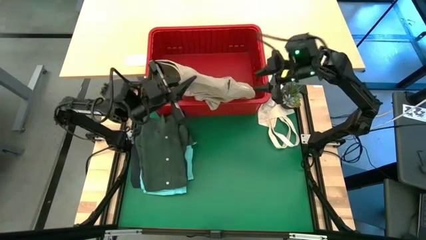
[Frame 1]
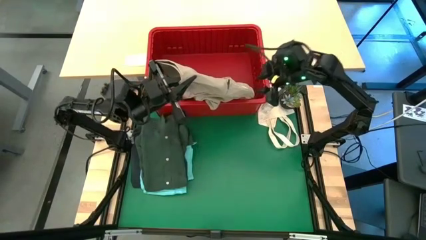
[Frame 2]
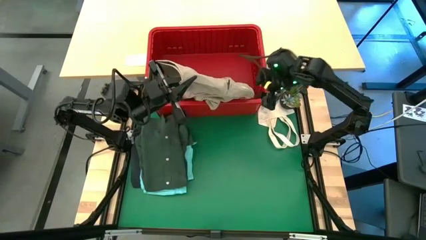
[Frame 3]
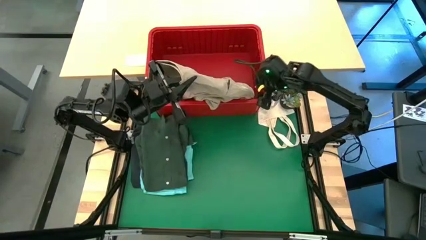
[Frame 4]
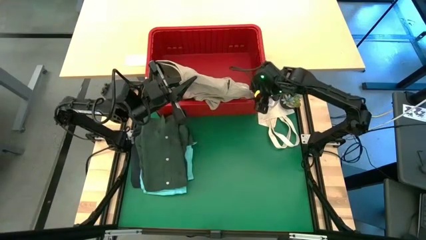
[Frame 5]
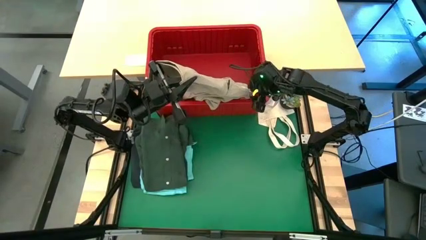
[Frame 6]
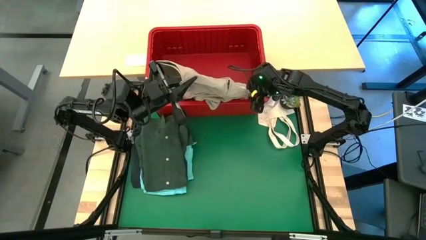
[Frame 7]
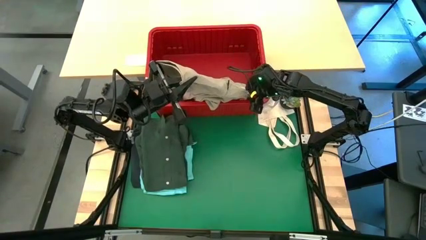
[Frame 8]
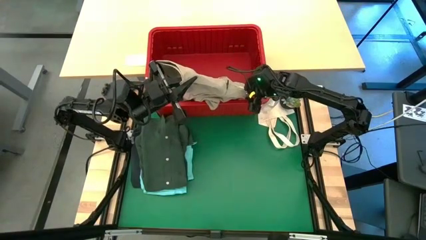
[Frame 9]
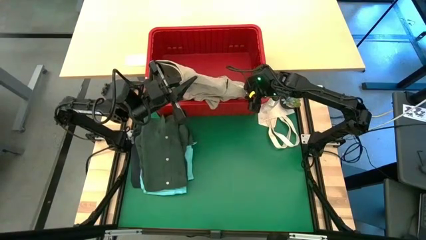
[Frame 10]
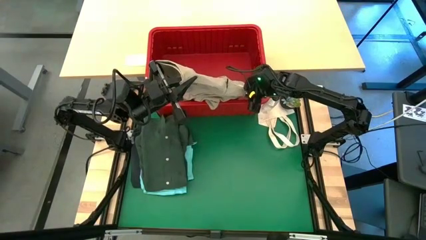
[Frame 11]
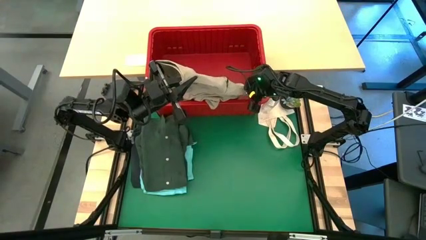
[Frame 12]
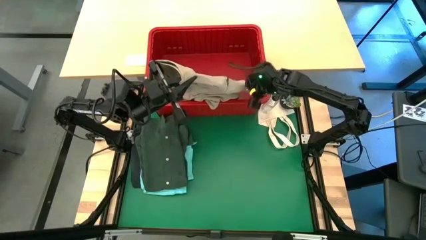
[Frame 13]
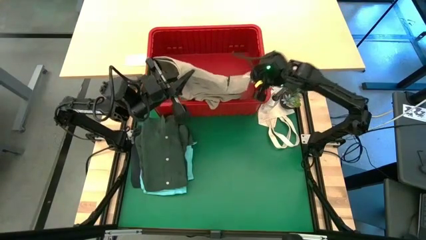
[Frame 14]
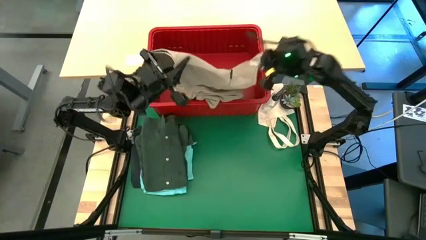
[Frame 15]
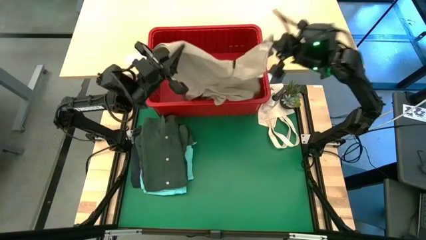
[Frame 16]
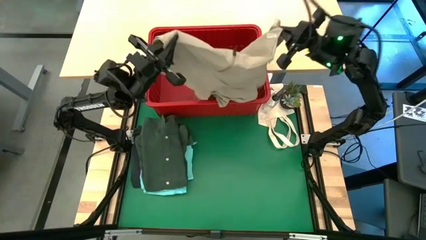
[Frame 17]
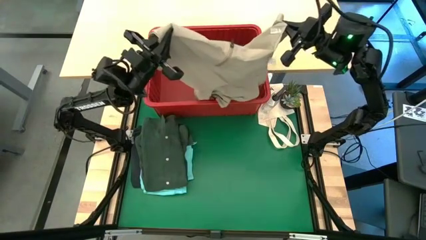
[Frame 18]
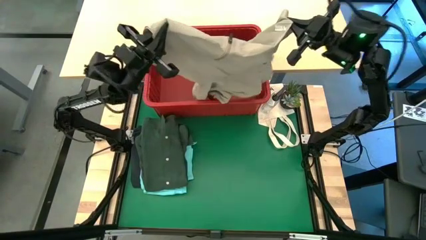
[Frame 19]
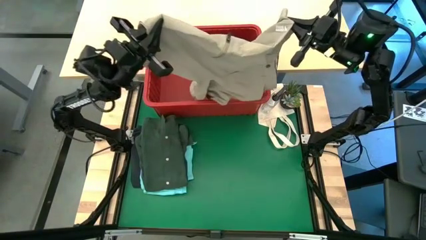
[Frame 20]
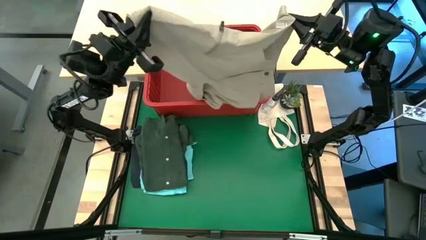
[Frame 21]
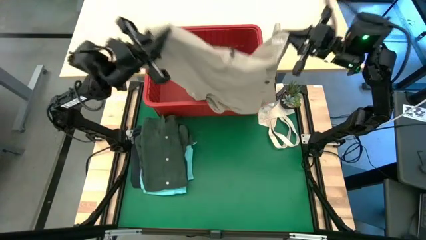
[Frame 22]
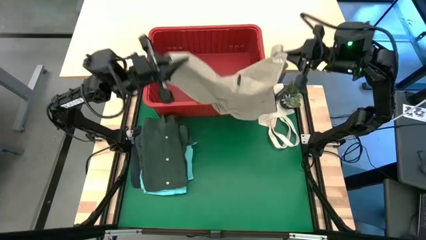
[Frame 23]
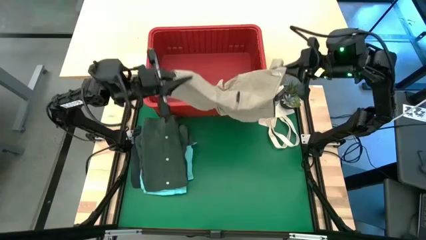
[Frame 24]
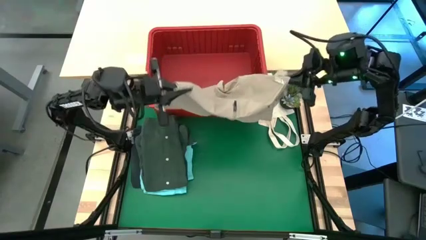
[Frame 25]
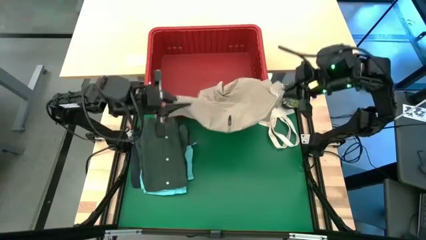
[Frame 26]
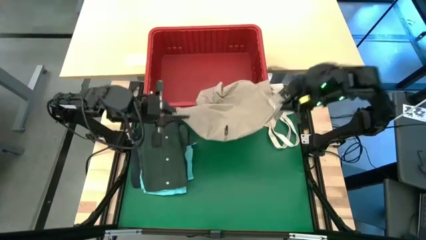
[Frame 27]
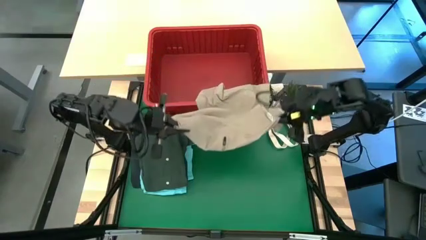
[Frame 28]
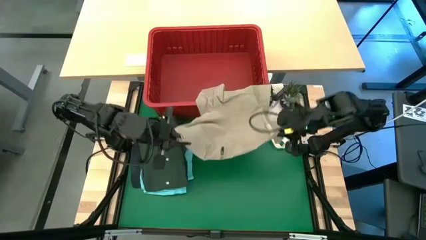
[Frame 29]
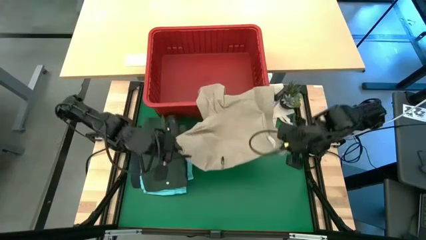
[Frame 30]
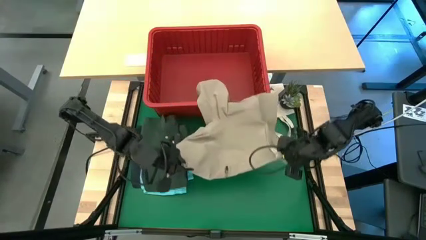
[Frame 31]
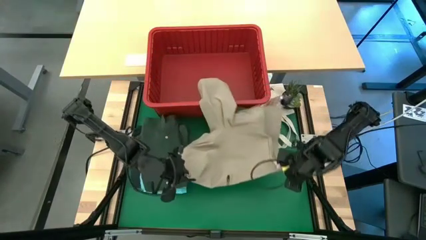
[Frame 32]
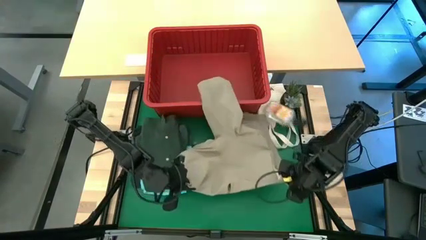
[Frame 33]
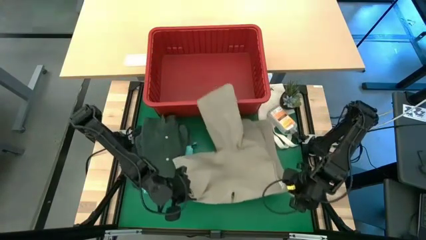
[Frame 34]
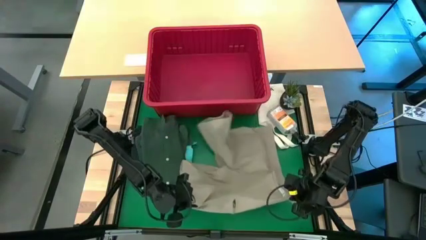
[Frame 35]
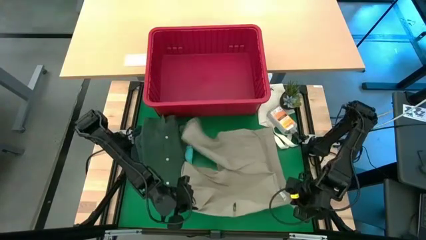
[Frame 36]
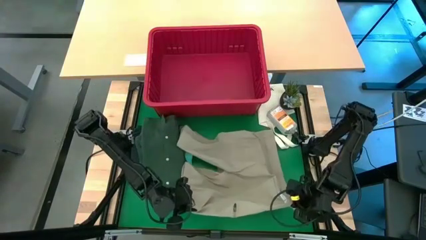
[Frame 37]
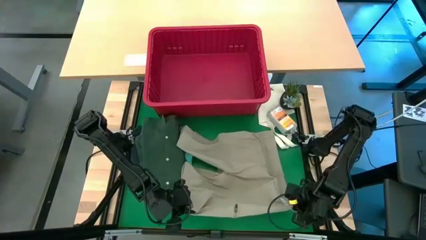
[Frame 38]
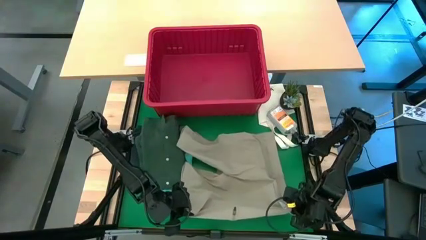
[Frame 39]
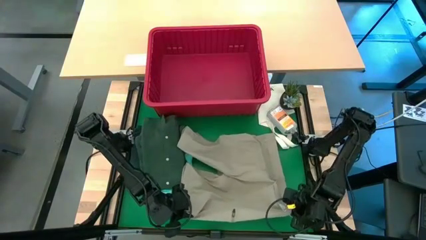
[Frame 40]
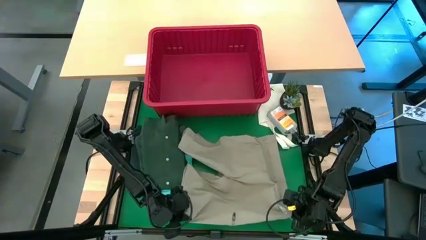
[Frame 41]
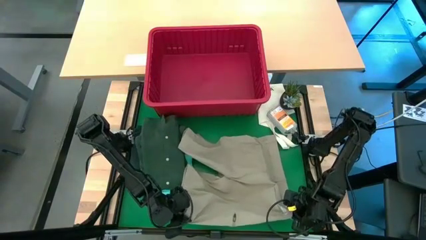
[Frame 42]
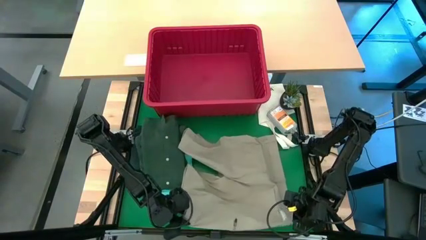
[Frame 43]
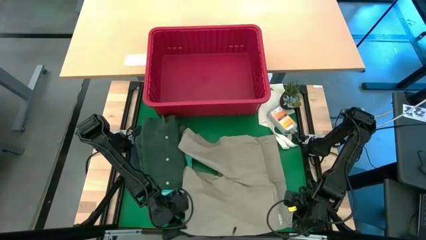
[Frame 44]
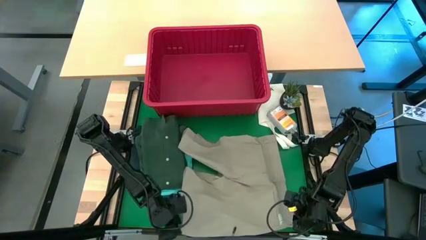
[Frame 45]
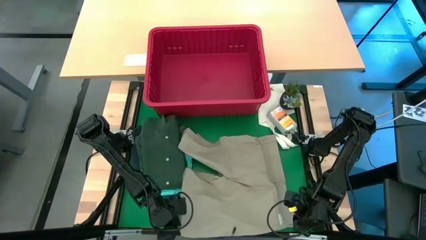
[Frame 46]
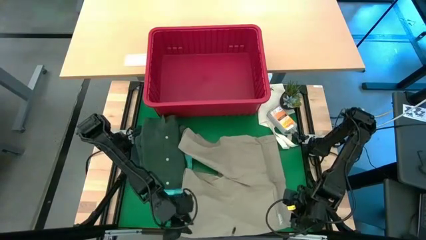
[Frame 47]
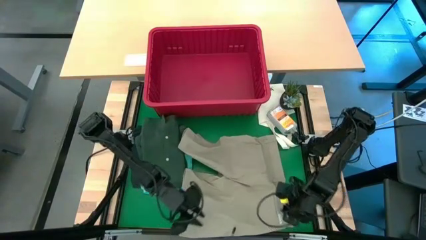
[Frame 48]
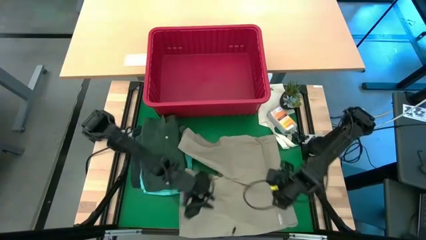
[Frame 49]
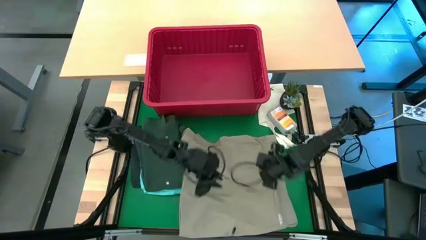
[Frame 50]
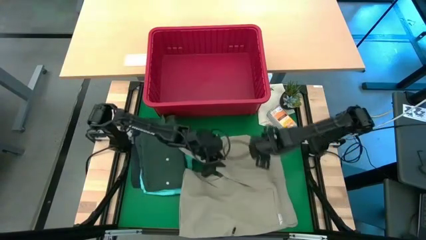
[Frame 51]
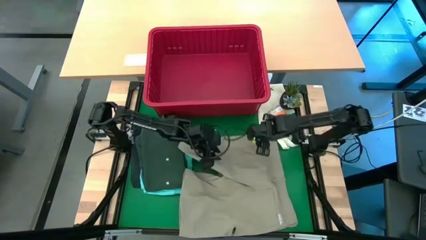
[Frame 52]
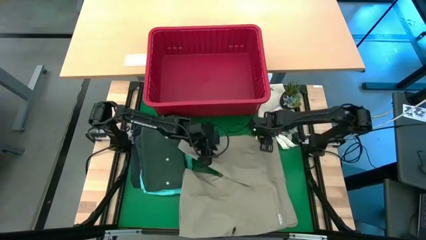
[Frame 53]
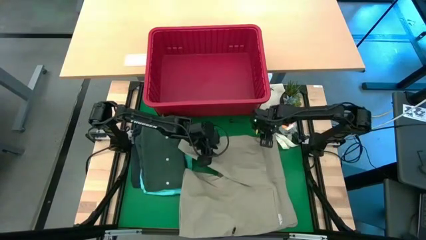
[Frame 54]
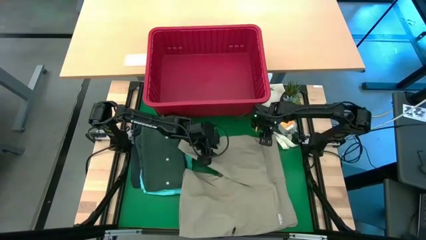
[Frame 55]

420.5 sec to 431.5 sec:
Task: Fold Laundry from Bin
Fold the brown shorts from the red laundry bin

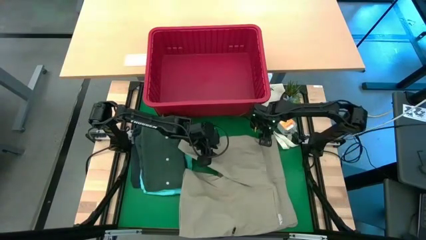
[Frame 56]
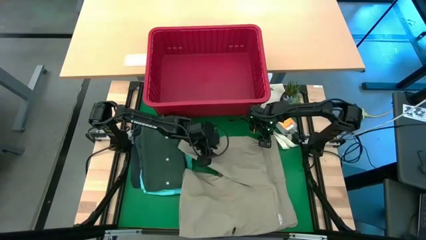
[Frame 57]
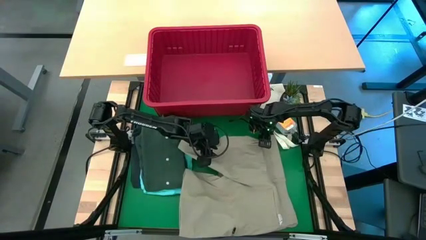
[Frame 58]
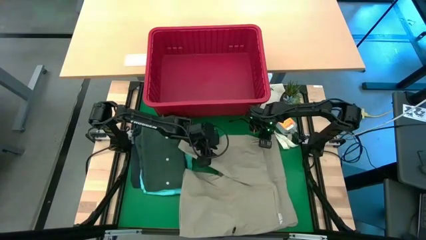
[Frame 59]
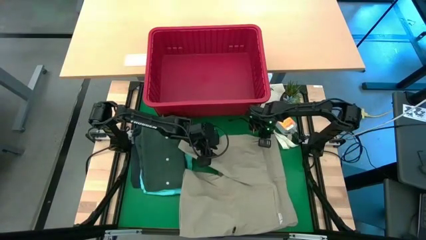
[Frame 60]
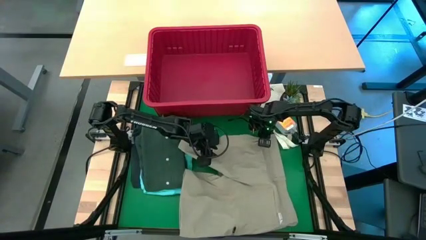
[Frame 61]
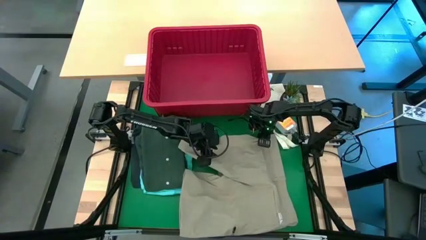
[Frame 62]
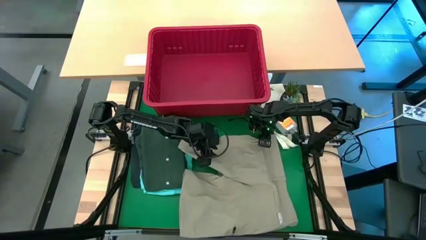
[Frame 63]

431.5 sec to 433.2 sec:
Fold the brown shorts from the red laundry bin

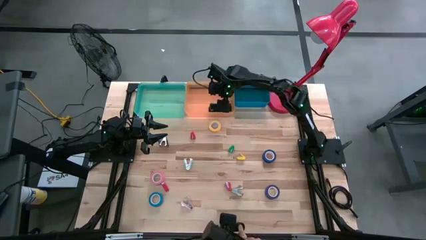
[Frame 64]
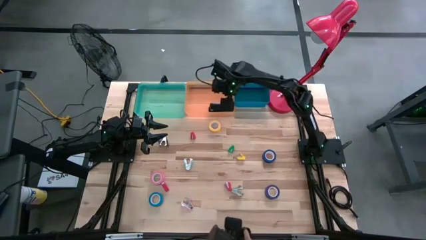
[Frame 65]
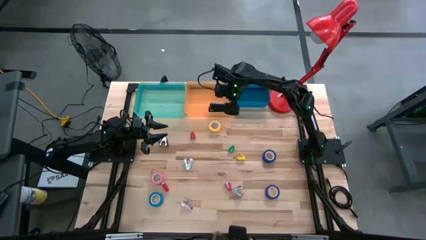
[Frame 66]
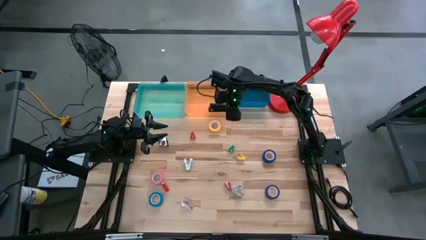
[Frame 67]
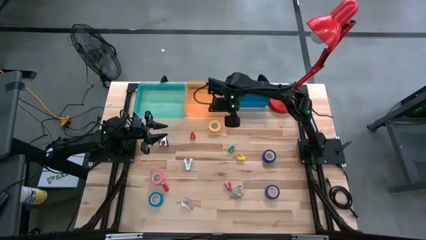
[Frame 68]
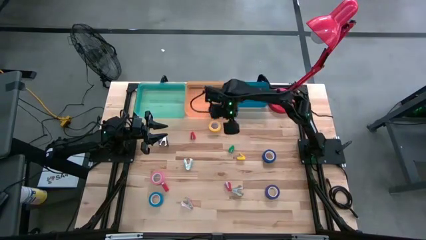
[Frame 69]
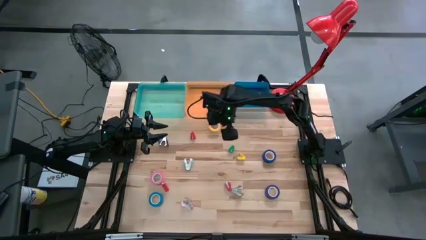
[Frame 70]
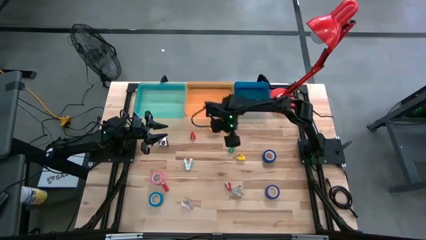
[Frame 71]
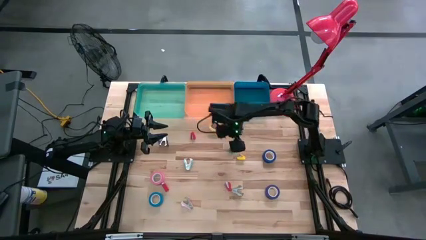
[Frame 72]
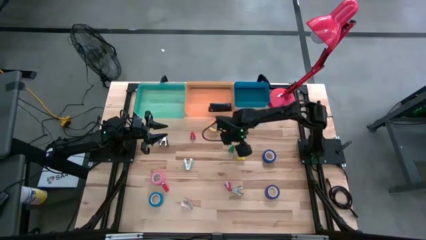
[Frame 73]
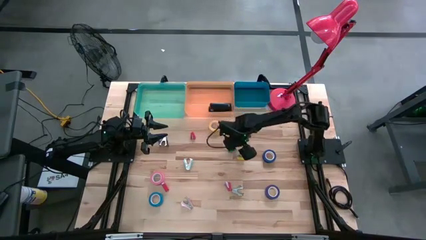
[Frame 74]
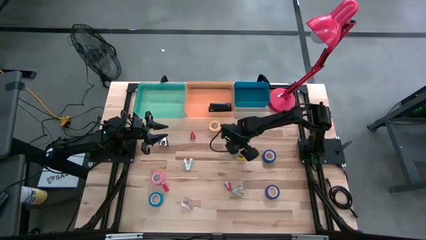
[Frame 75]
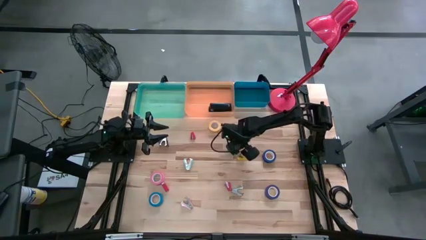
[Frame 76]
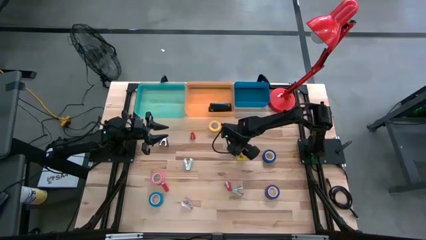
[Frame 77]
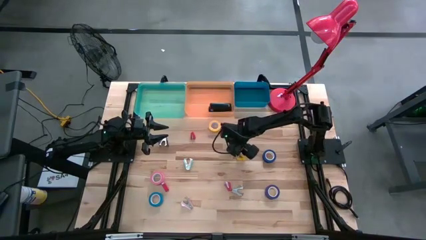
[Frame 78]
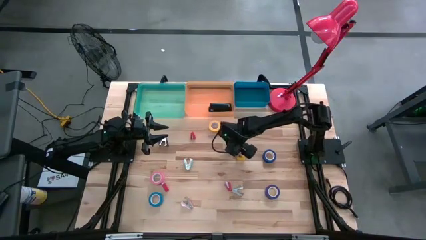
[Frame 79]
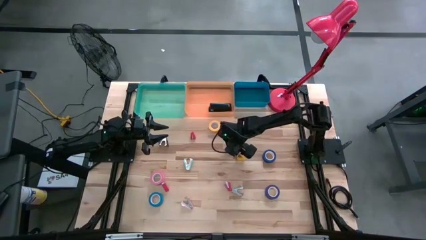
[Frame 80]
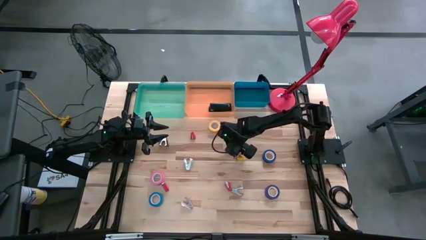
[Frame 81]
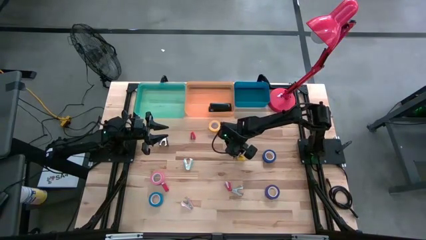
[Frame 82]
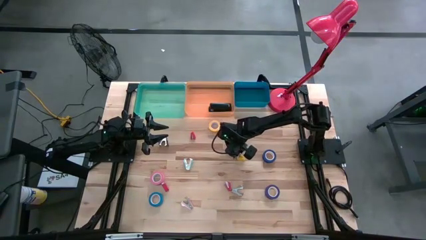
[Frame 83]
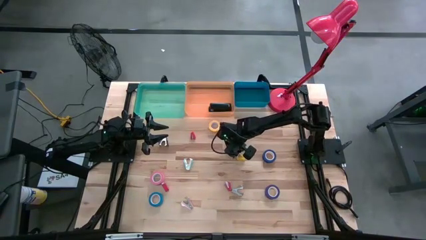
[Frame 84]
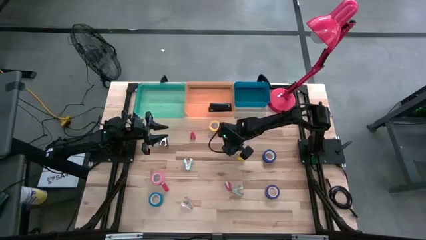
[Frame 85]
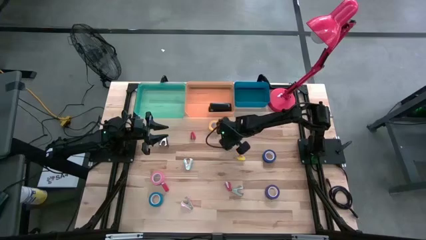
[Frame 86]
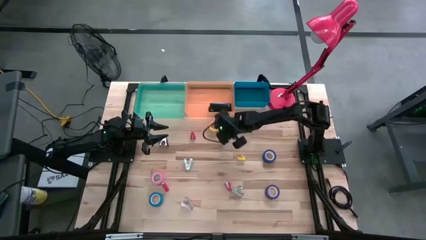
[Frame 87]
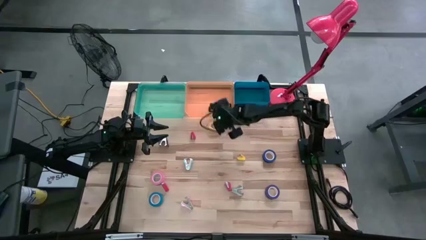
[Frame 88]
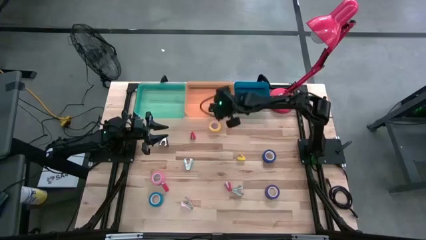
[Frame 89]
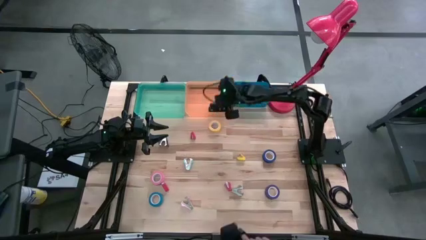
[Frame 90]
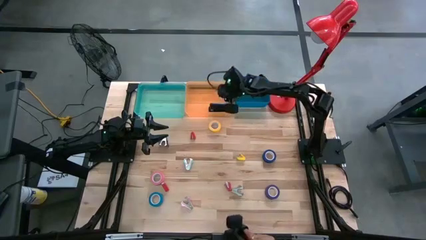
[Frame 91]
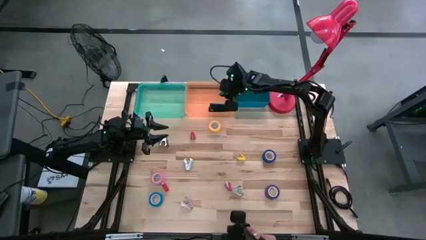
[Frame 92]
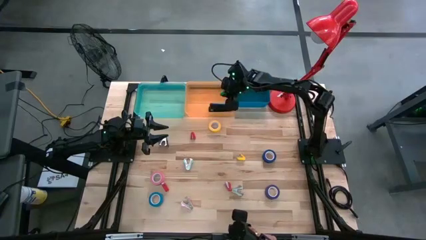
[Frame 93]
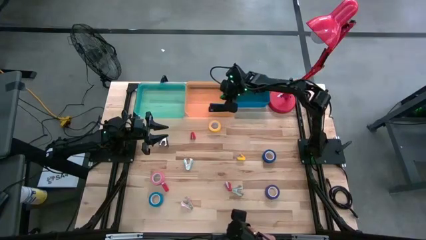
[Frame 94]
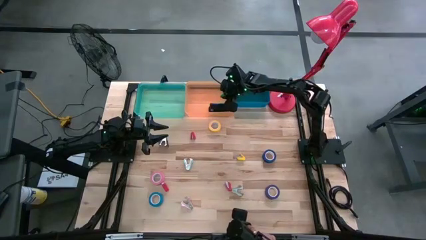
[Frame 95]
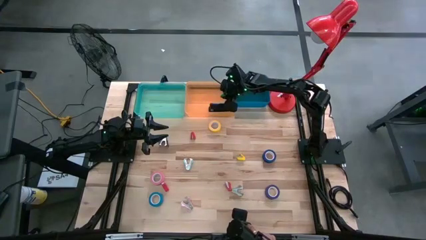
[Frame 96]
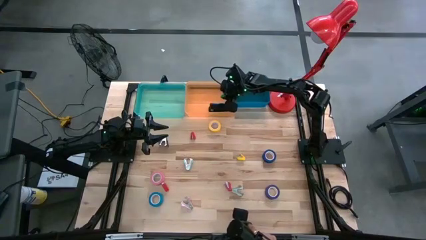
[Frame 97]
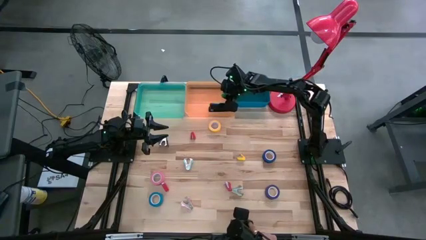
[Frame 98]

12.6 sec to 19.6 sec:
Task: Pick and place Stapler, Stapler remover, tape
Put the green stapler into the orange bin
